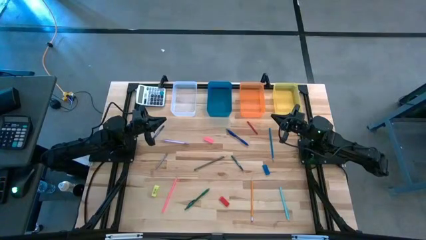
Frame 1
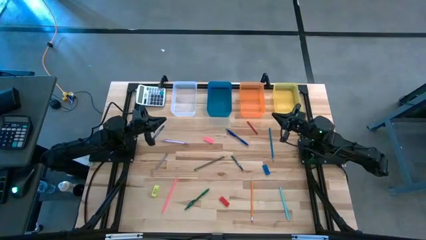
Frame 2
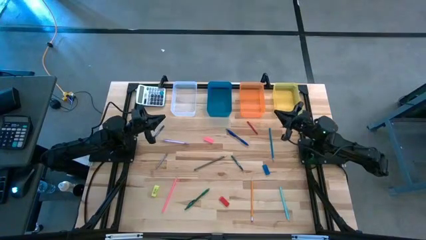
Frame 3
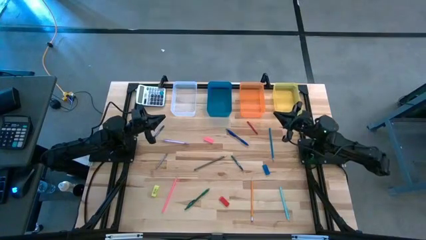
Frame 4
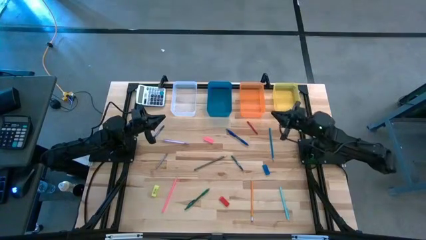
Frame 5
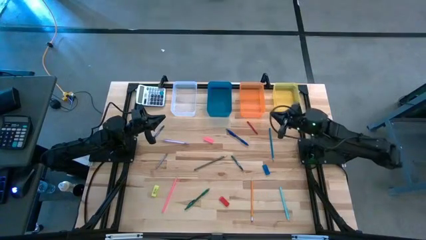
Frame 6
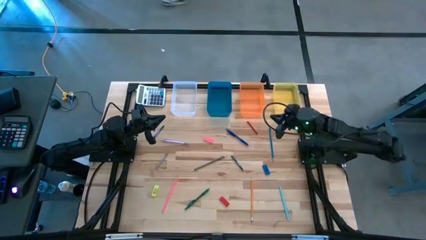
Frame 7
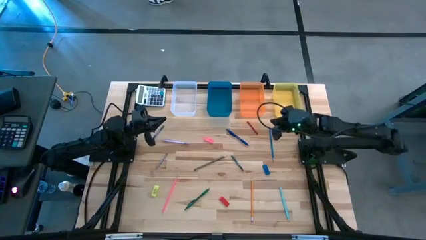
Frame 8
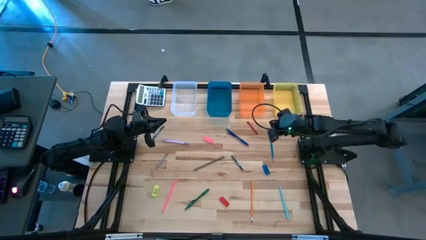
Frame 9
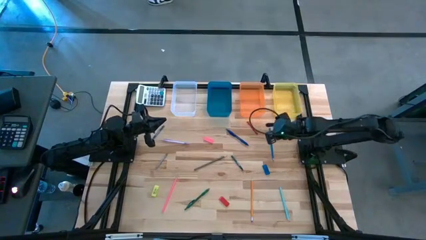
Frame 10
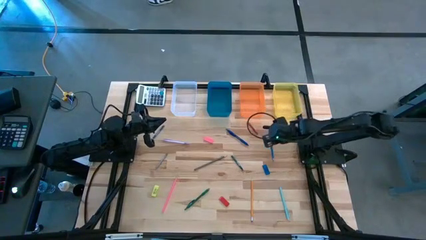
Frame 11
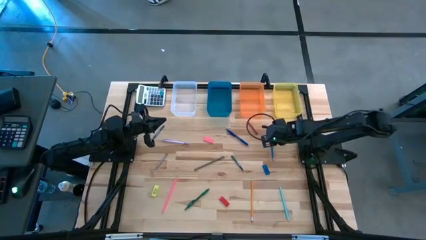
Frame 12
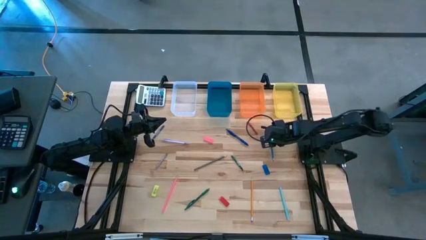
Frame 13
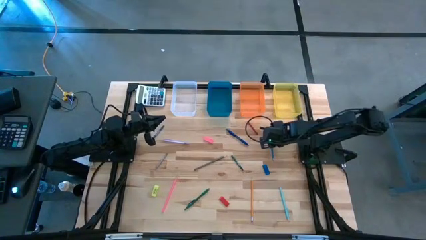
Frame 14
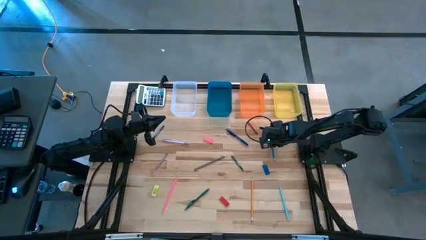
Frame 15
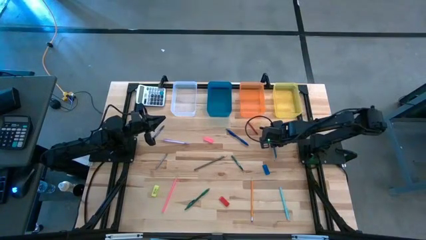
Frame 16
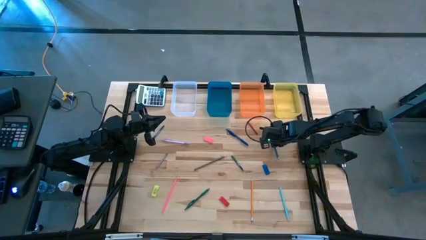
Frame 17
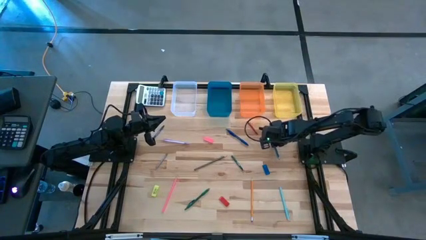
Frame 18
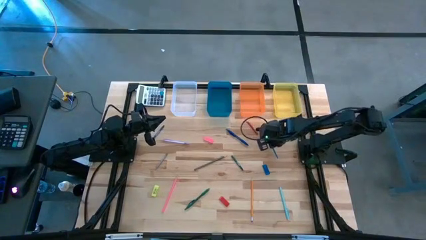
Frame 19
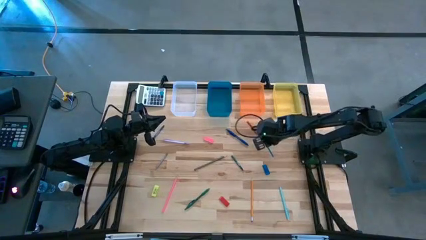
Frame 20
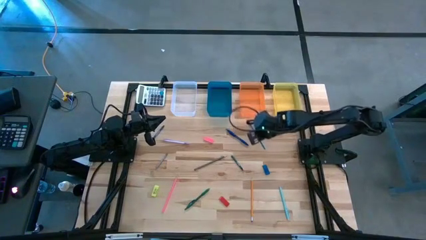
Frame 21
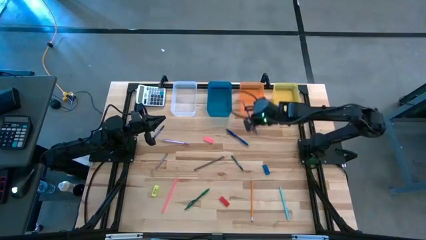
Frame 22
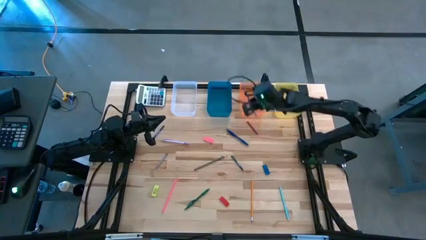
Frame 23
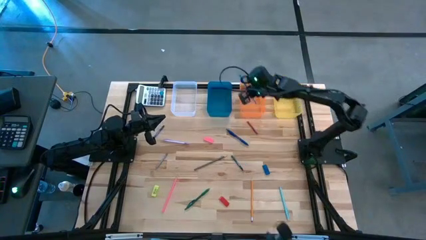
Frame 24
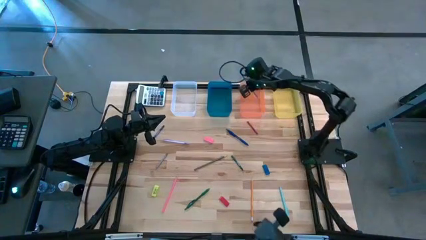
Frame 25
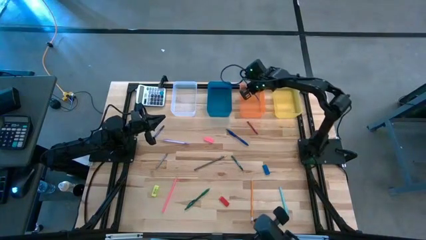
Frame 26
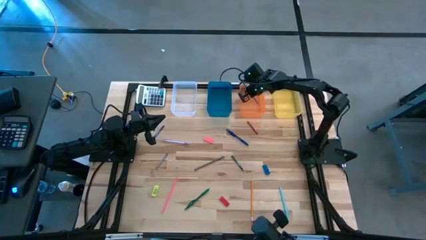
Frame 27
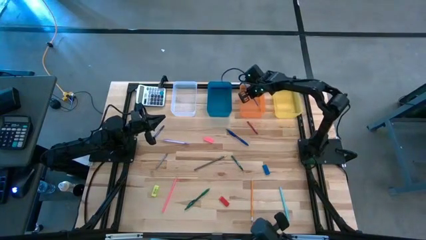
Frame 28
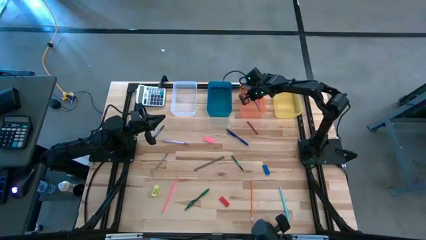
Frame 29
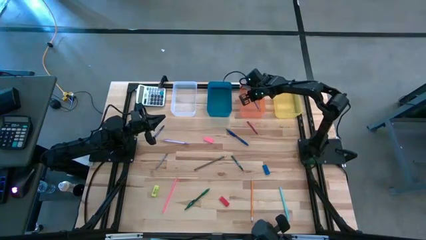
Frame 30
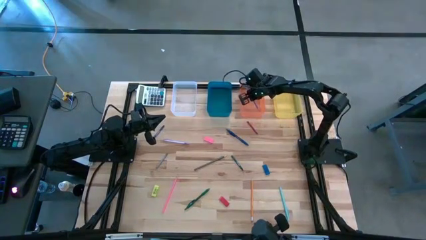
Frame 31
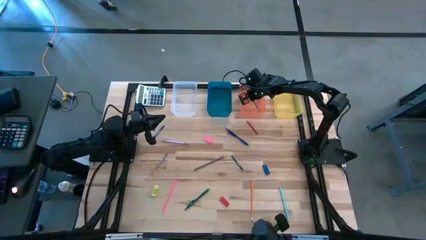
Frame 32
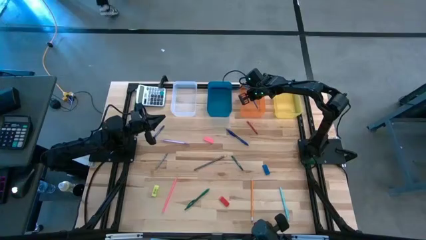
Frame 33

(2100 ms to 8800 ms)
Task: Sort crayons/erasers/pens/pencils in bins
Put the blue pencil into the orange bin

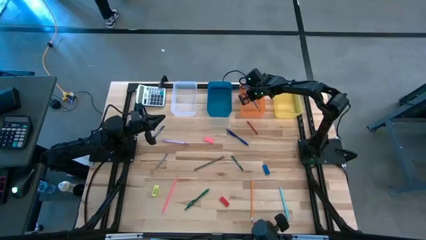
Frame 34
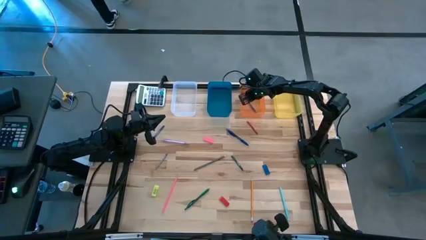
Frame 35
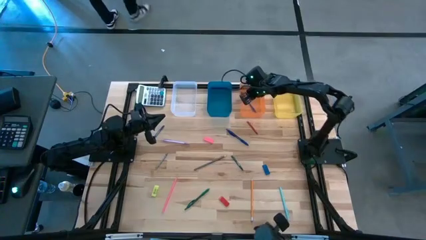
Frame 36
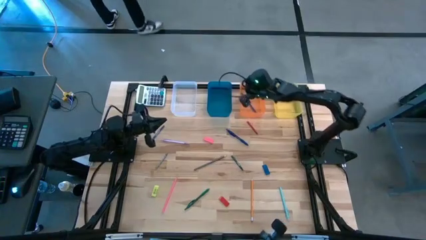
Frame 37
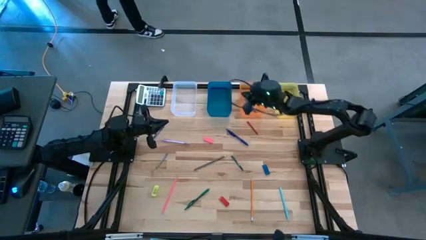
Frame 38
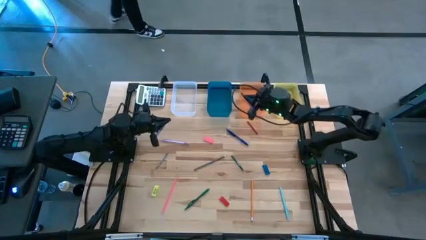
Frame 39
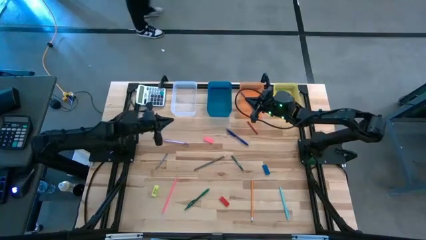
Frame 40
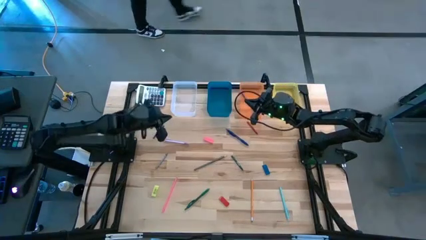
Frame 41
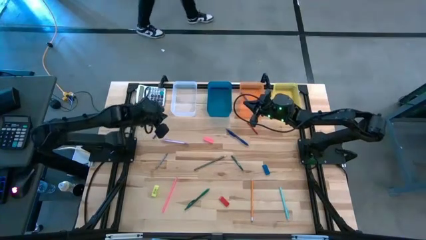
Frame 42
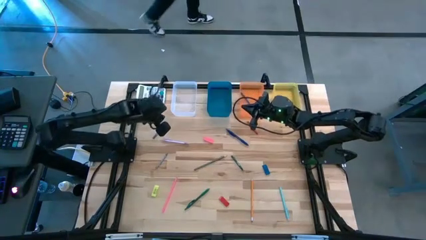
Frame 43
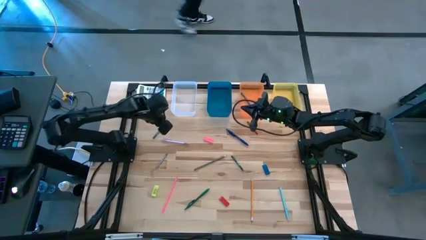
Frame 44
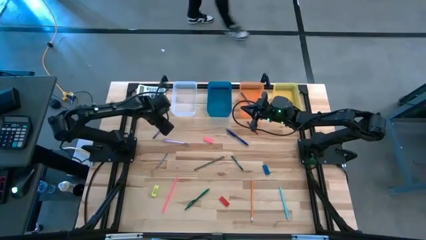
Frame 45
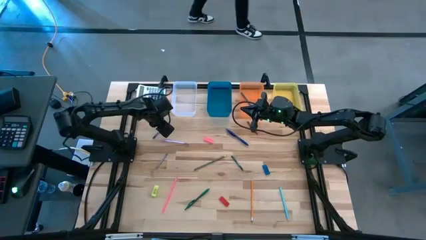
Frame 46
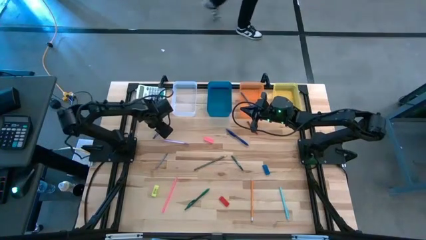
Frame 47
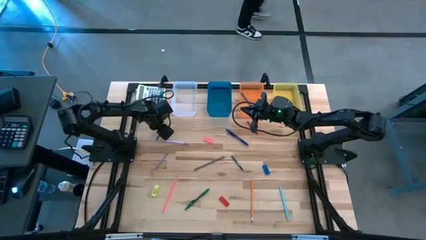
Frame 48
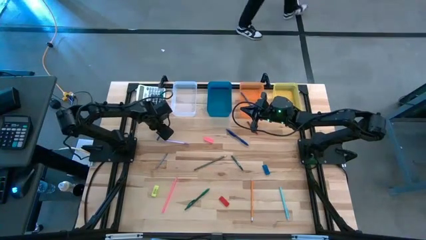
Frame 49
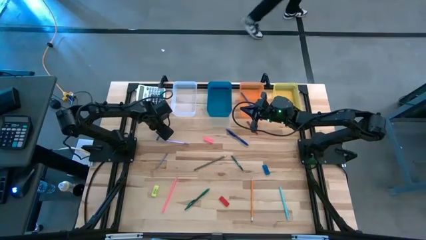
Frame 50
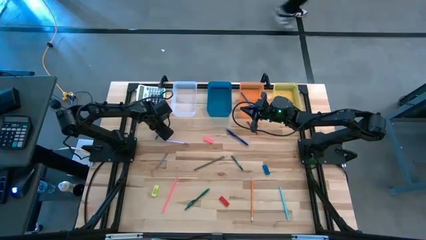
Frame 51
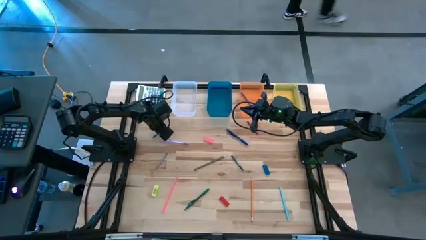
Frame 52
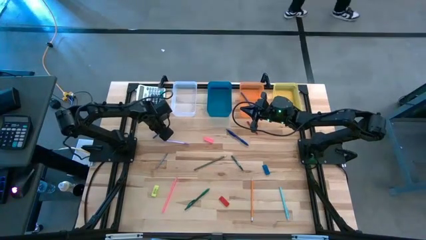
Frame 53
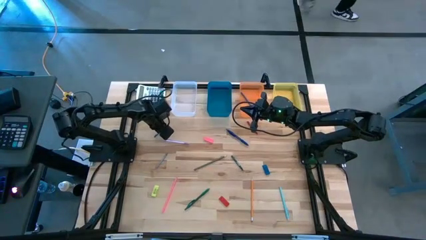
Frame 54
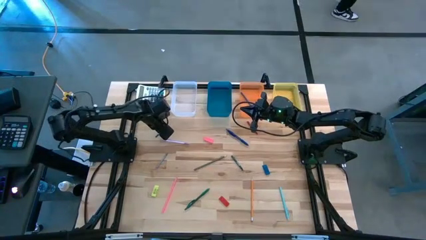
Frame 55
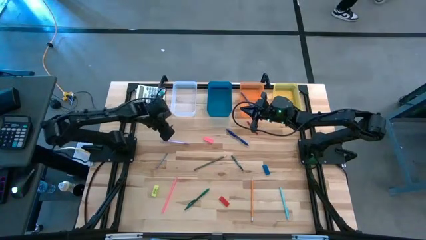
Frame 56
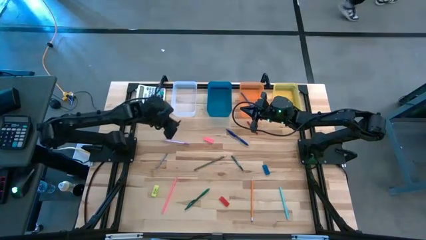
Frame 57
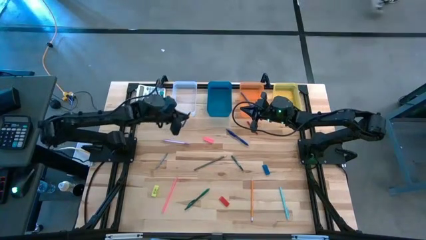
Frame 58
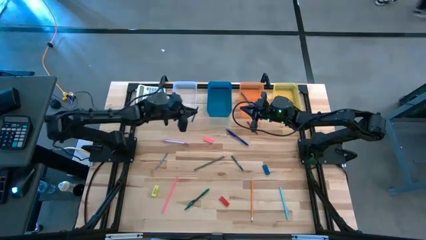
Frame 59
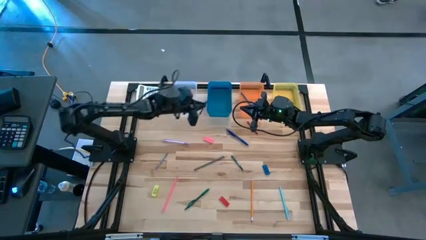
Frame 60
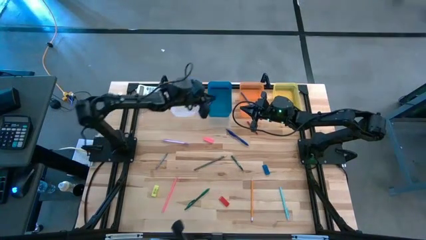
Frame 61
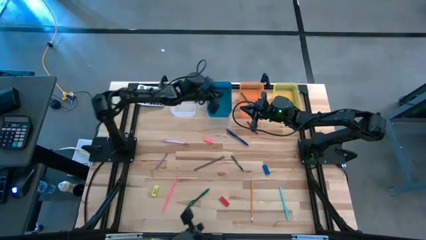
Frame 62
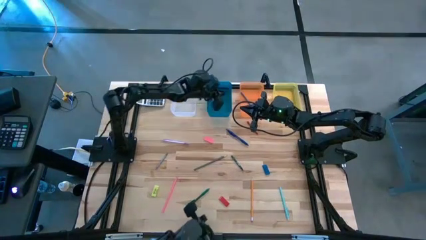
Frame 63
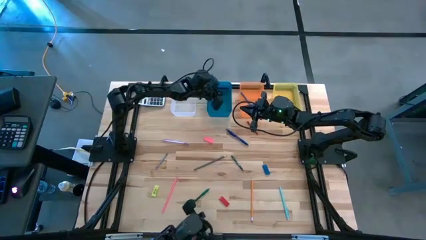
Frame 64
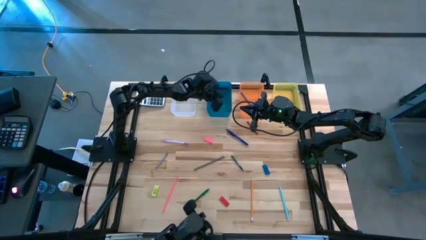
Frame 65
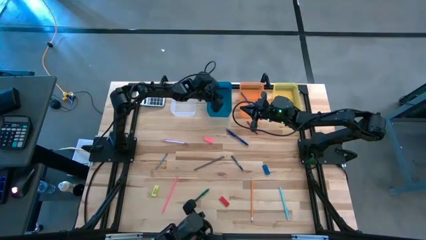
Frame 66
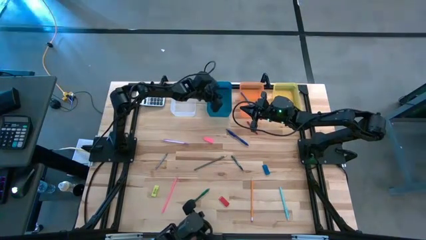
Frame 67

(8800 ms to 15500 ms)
Put the blue crayon into the blue bin

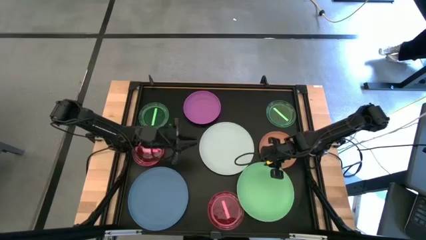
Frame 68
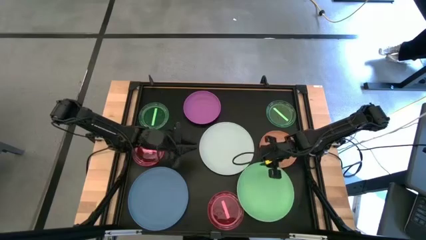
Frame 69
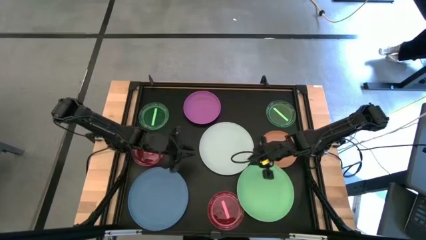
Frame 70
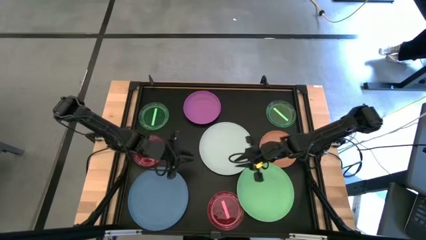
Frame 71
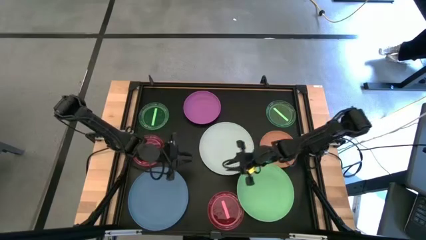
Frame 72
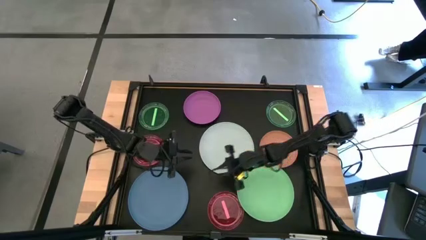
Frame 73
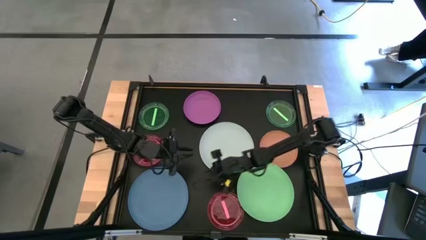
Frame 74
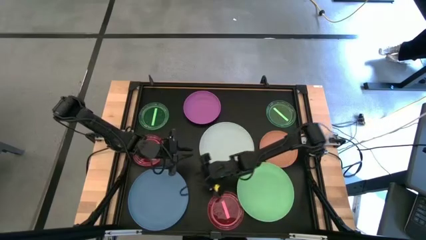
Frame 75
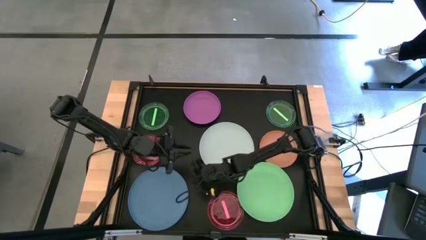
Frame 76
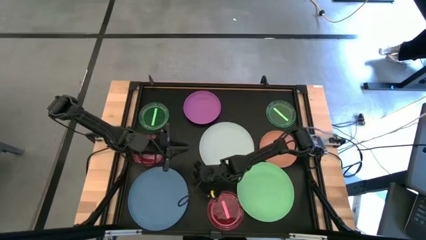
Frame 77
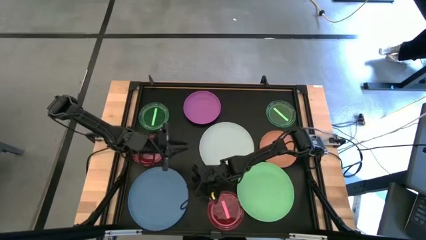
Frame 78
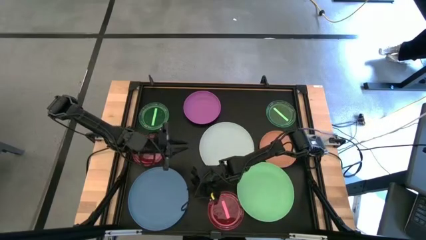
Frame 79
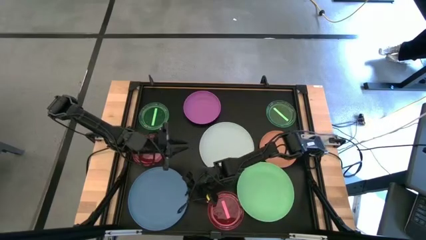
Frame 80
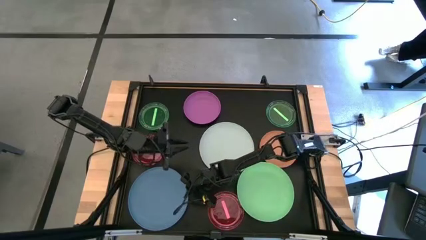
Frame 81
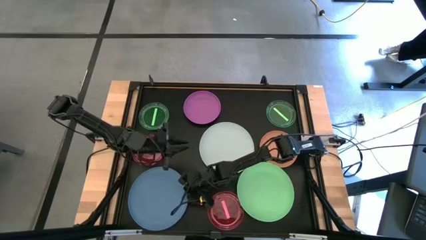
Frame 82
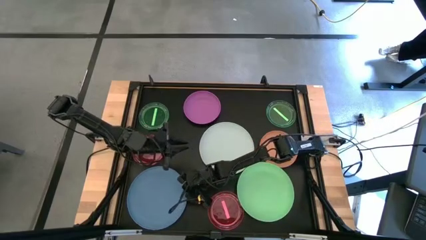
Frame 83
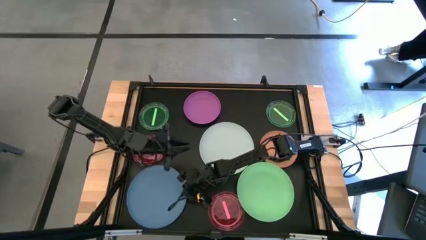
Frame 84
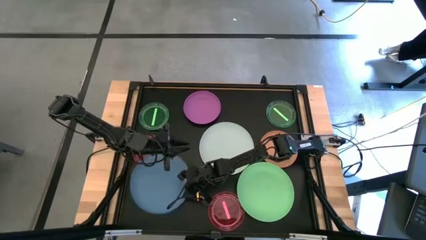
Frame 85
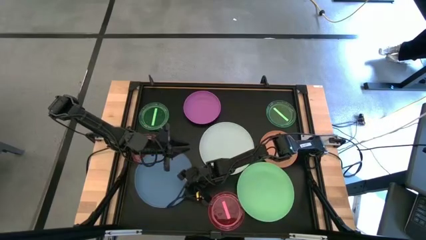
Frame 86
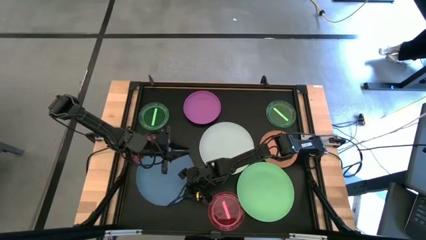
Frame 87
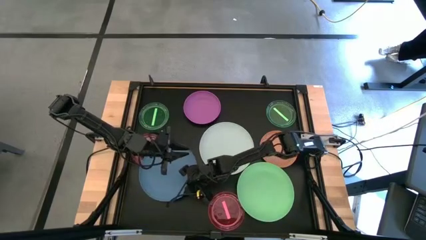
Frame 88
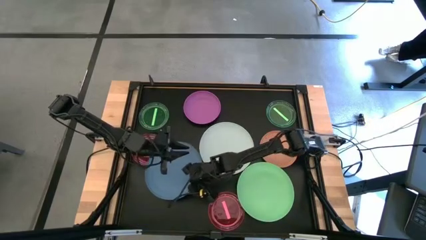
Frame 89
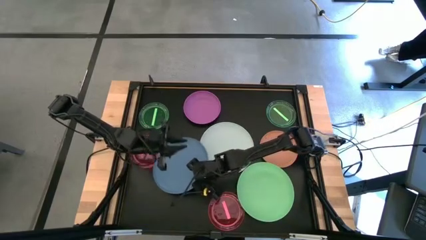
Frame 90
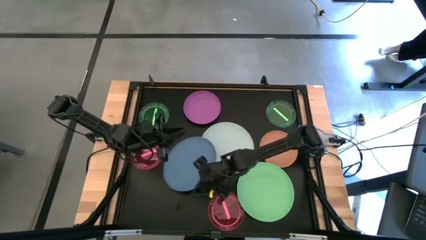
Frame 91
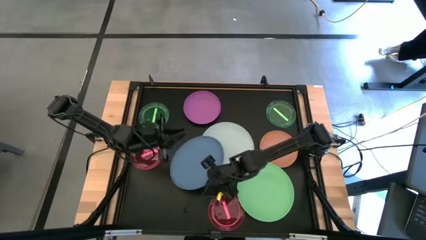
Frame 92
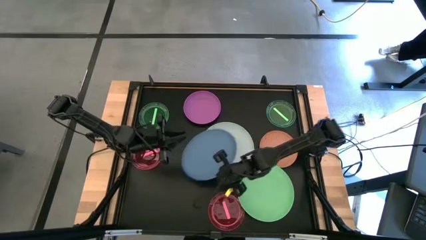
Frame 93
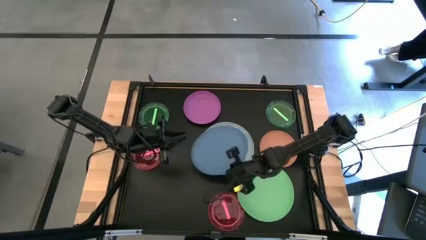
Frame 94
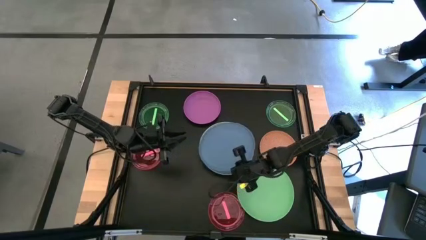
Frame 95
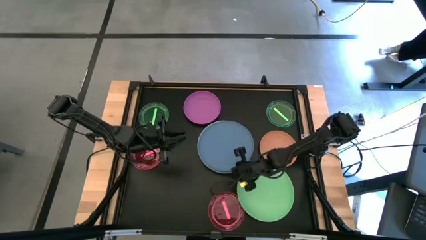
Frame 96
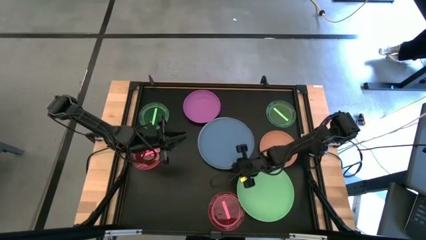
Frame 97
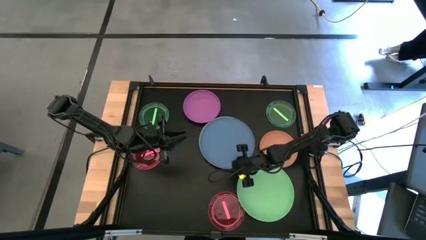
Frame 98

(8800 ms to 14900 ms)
Task: Stack plastic plates
Stack the big blue plate on the big white plate
